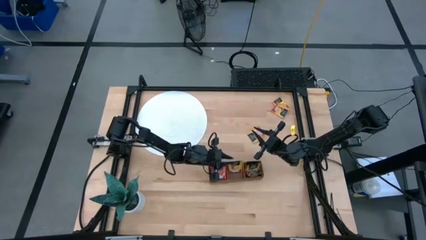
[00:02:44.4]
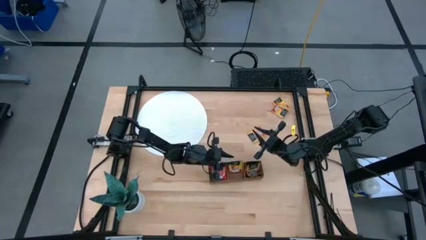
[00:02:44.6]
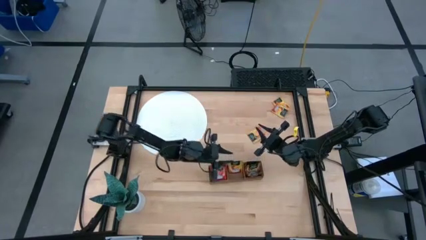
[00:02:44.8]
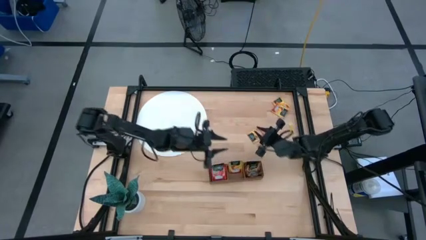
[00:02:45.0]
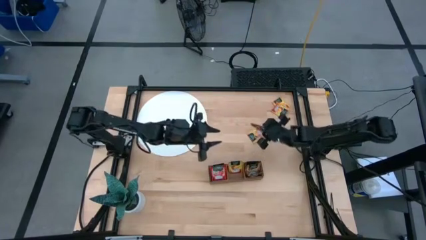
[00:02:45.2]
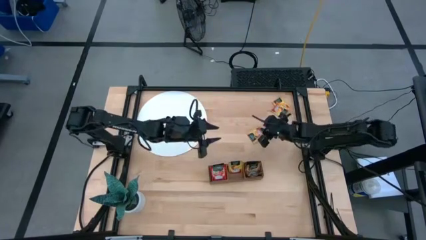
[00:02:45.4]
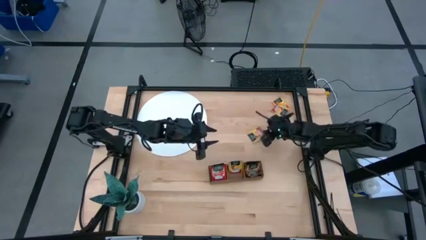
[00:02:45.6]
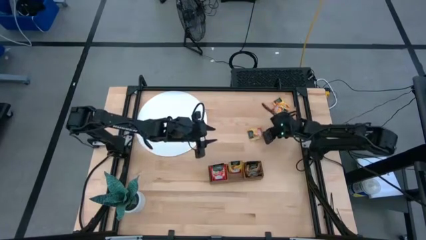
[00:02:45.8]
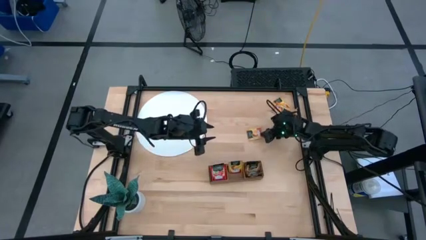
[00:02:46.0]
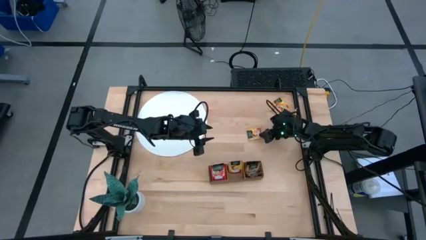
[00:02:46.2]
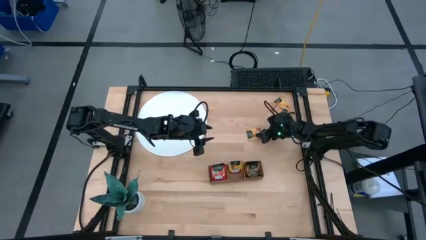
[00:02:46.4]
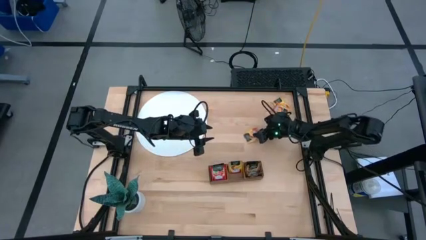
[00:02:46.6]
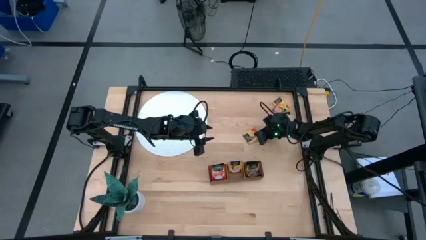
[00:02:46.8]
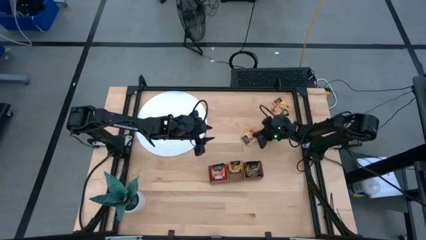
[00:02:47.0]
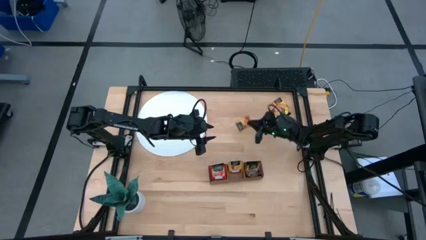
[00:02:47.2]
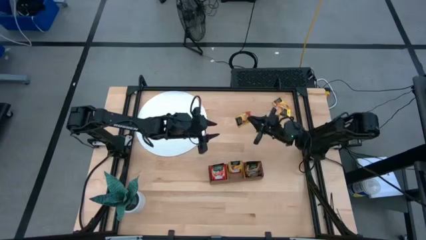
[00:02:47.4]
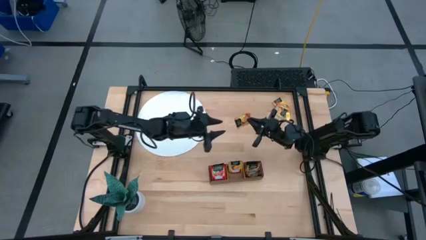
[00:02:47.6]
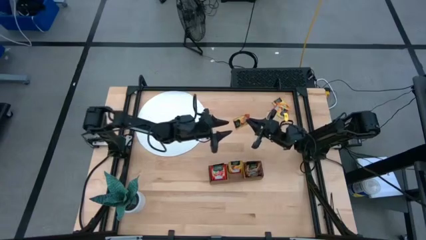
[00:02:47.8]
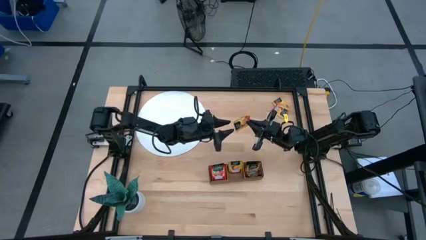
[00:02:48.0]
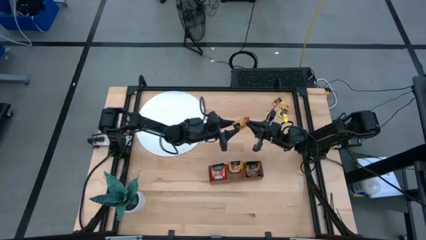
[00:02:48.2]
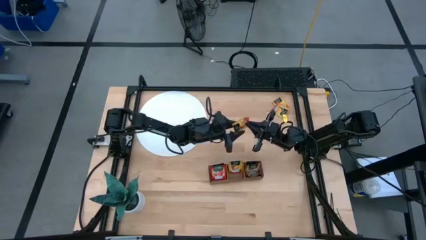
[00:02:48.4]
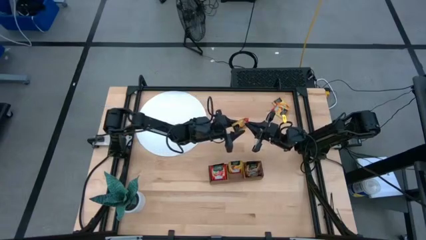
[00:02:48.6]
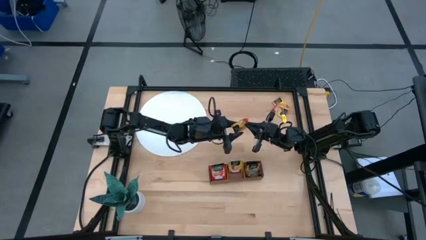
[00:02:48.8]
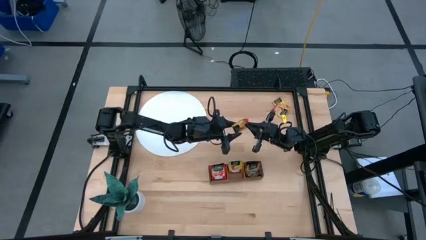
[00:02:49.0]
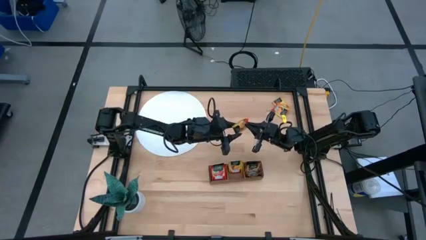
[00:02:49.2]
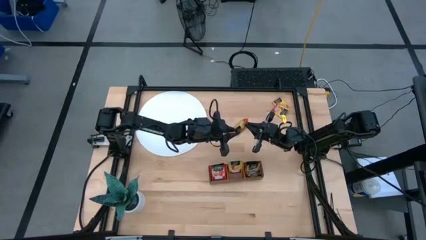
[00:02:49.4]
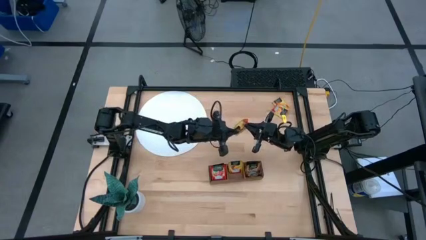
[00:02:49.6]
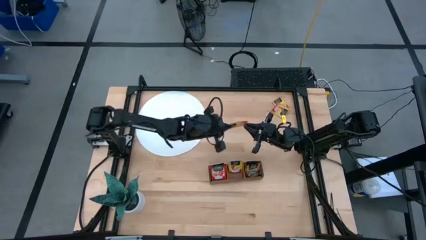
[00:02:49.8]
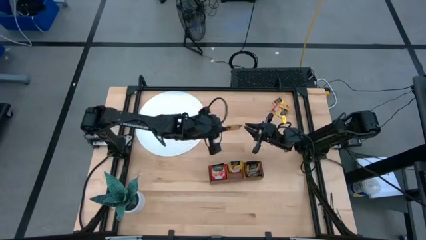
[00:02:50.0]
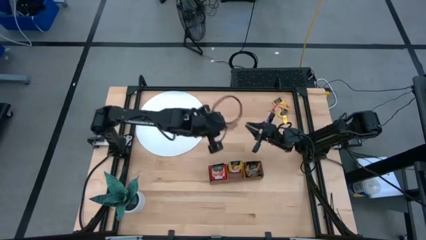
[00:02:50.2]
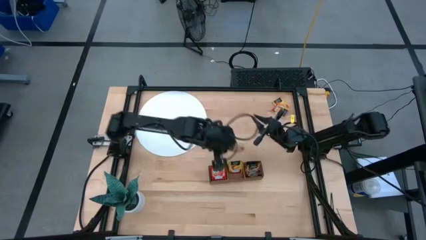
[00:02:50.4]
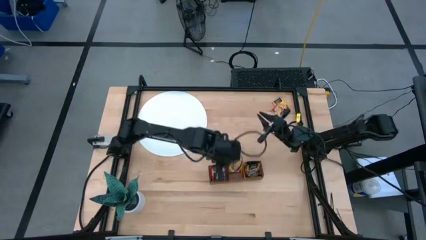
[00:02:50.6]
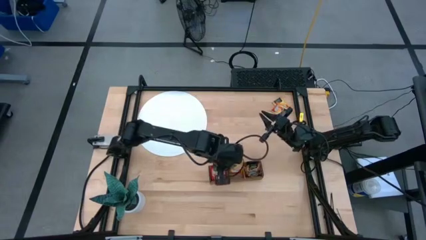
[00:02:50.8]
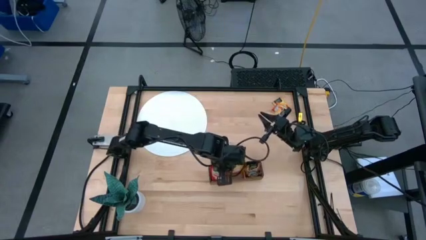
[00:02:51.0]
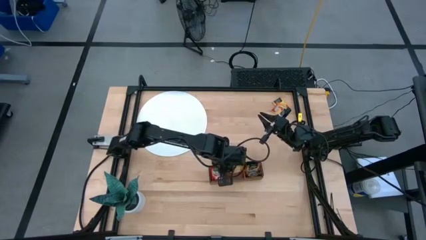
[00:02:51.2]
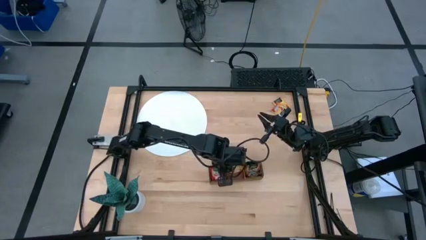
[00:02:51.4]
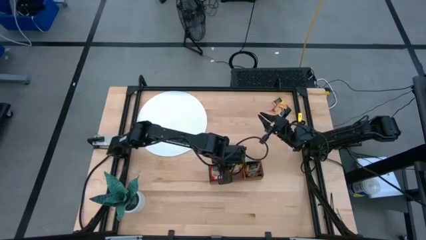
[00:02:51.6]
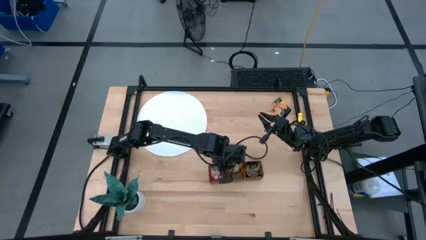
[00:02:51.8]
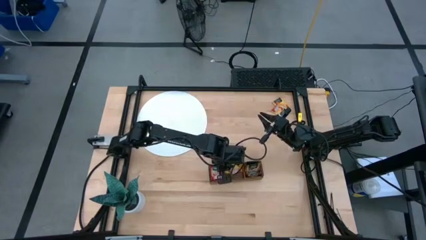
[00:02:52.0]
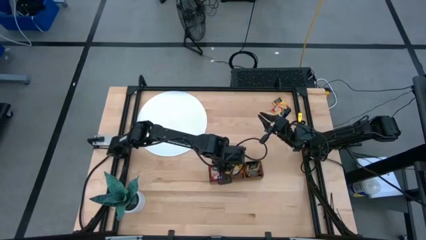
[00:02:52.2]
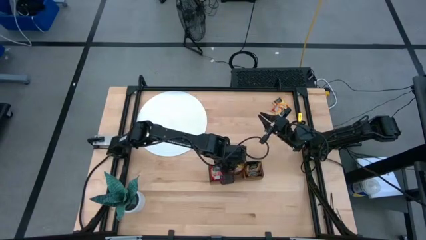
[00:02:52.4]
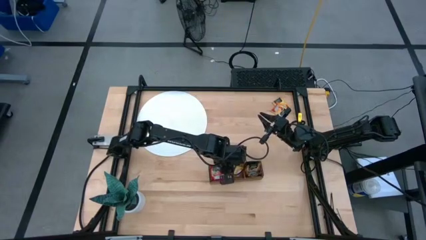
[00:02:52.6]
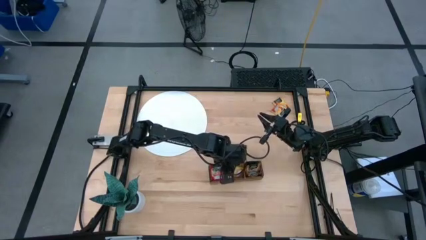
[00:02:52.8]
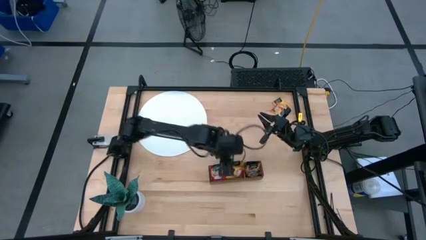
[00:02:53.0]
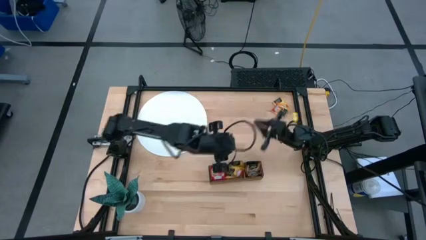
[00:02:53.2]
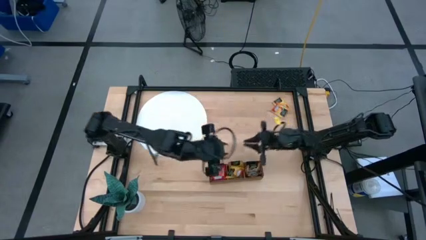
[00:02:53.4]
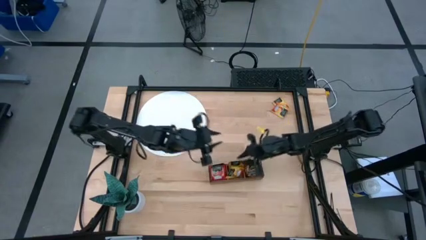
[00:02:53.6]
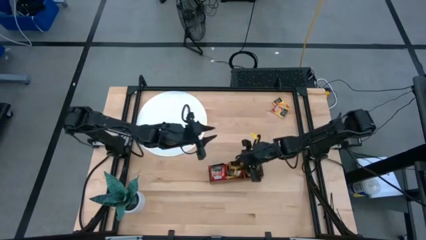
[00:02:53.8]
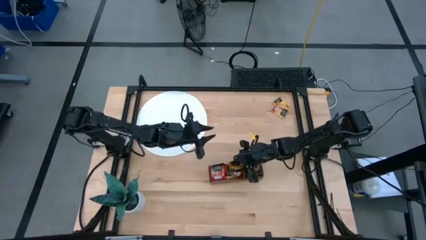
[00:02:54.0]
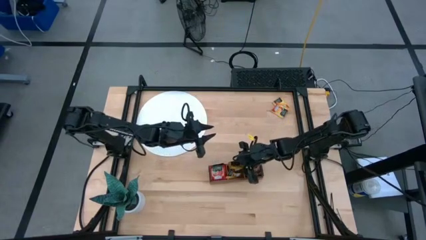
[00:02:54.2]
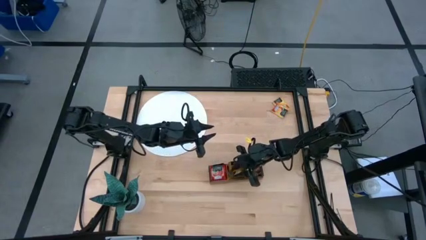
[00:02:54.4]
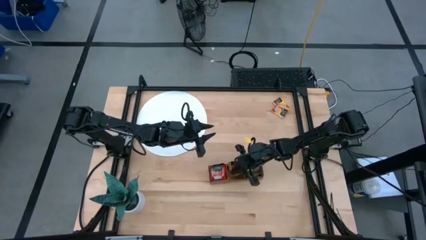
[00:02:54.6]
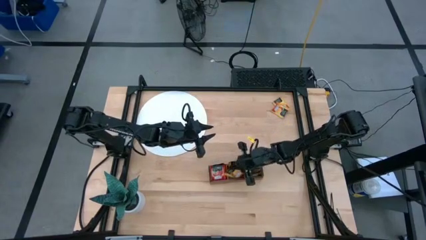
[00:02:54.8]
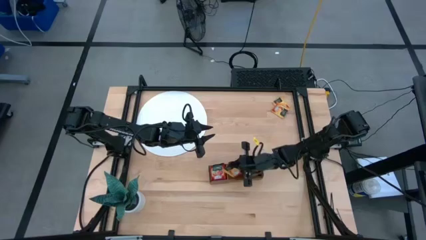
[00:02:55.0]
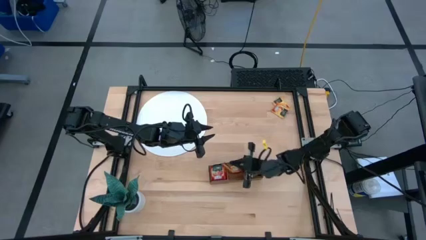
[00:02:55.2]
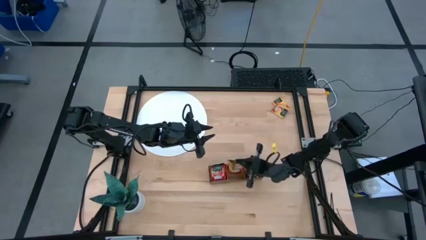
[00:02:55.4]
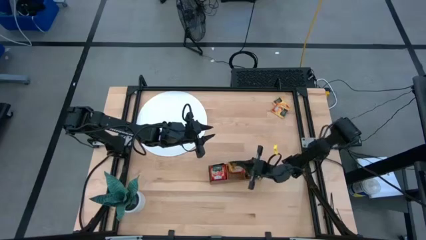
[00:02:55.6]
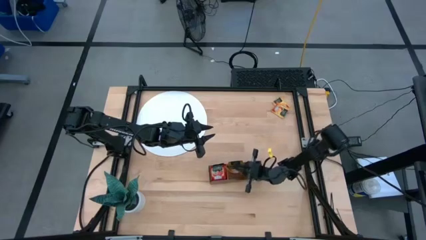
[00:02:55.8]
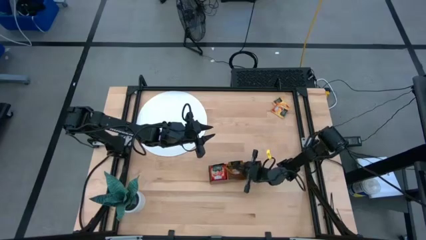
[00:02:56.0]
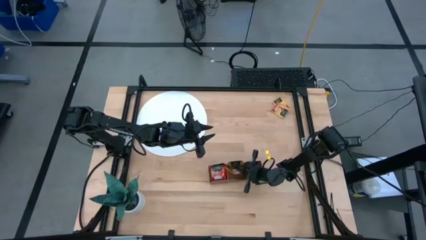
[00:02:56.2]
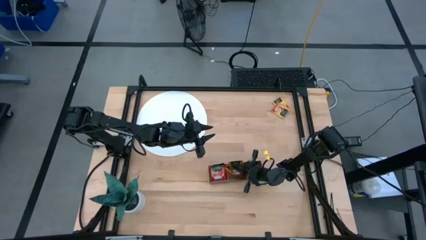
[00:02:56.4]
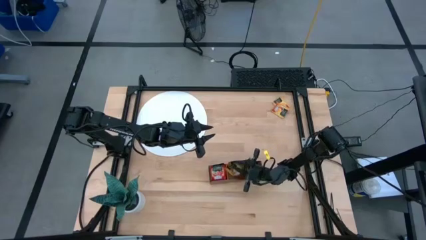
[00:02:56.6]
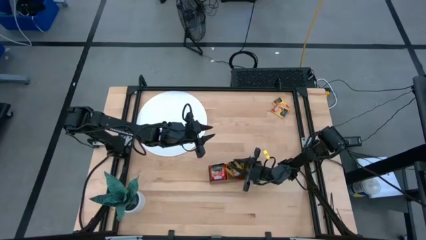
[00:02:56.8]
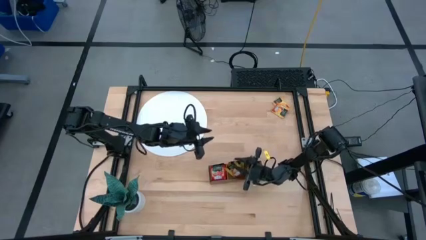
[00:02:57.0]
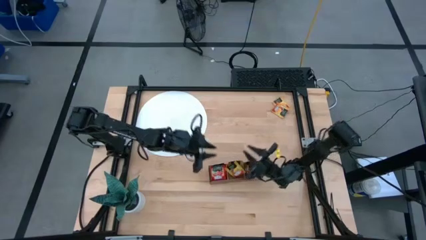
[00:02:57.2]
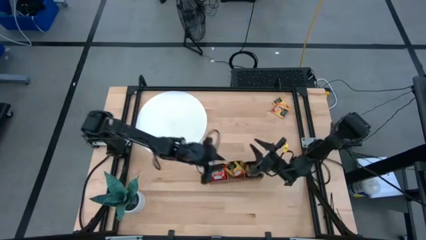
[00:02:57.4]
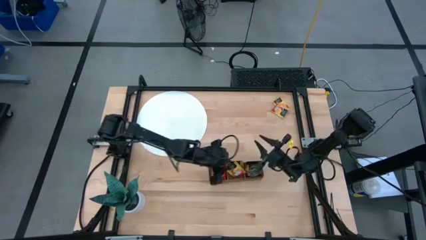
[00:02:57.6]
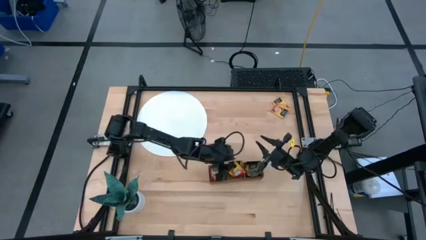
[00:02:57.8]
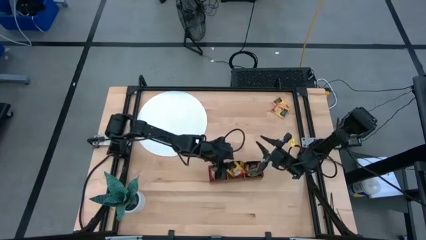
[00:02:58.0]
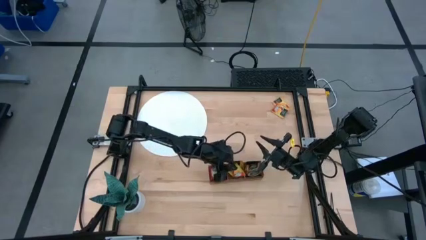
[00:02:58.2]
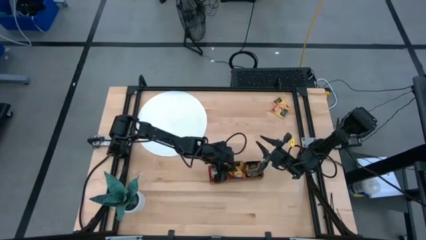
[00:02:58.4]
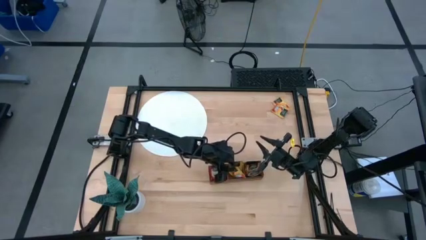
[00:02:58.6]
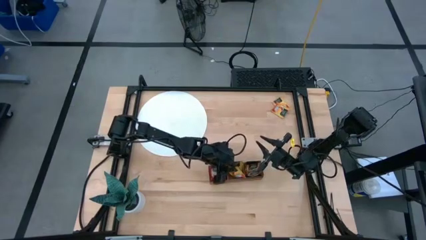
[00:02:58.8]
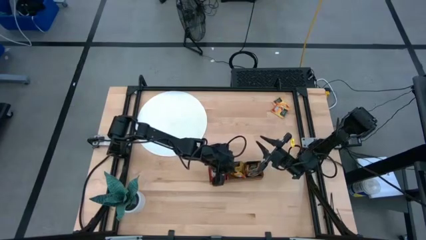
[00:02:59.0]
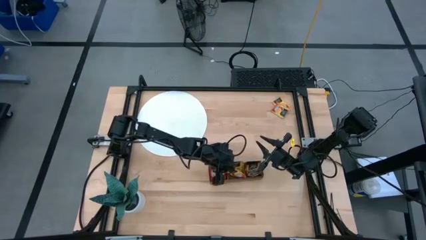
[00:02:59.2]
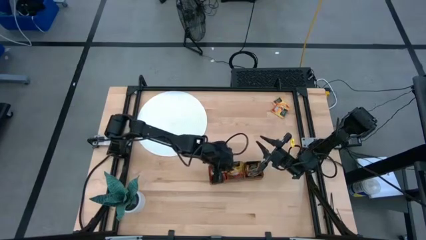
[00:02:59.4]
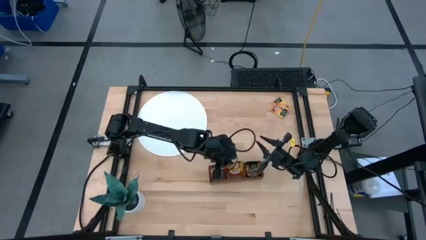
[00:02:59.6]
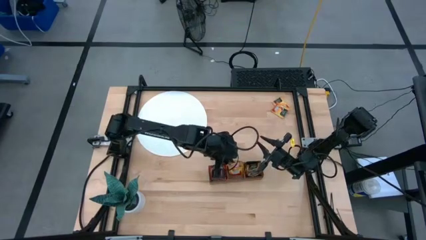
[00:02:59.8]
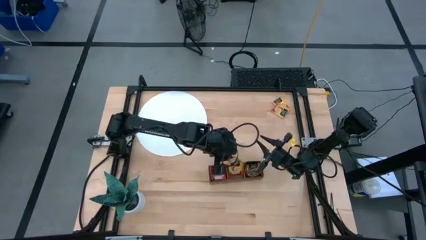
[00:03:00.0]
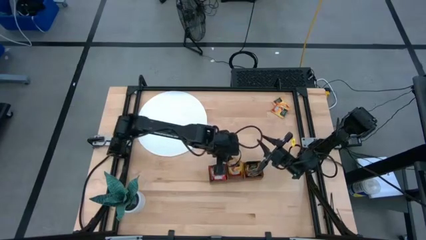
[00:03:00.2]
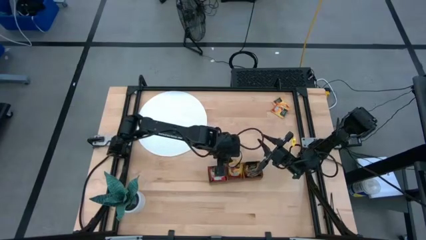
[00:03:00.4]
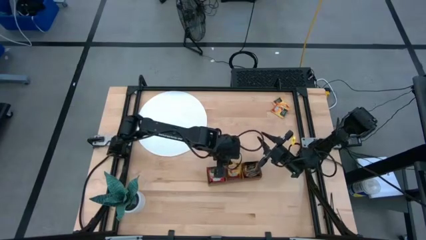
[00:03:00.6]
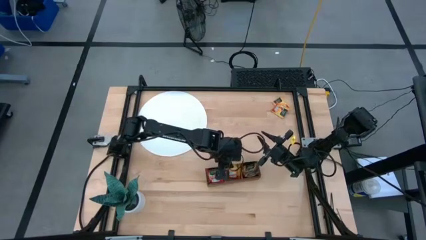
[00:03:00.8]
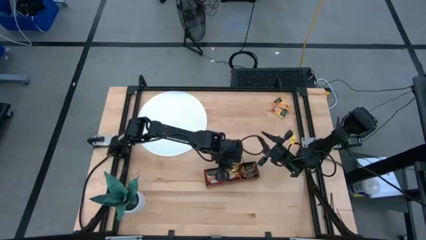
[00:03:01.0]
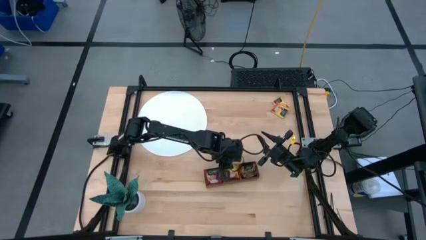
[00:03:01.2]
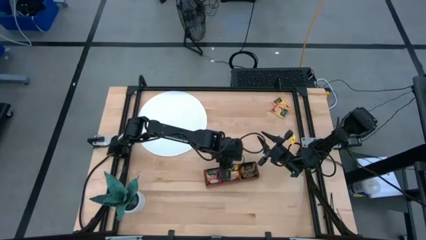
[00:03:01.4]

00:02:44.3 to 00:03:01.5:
Task: Pick & Place Tea
Put the orange tea bag into the middle section of the wooden organizer
